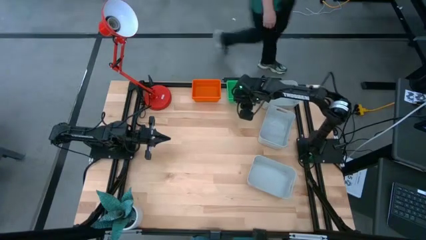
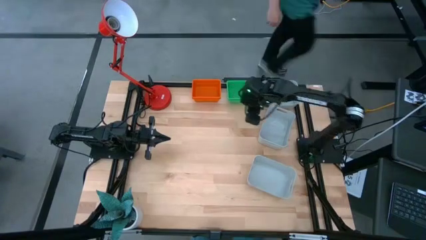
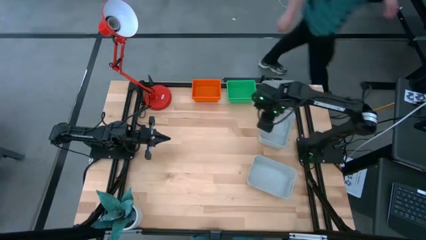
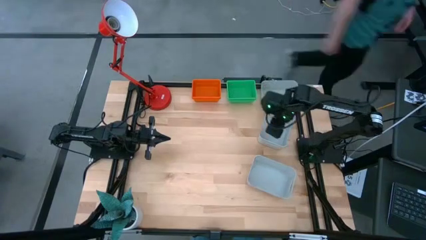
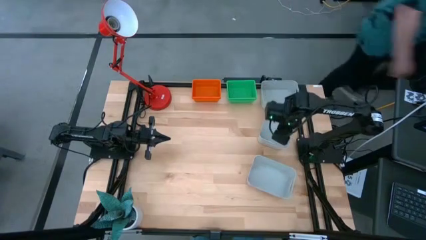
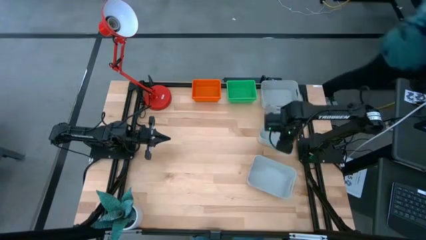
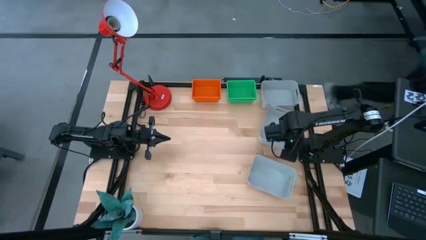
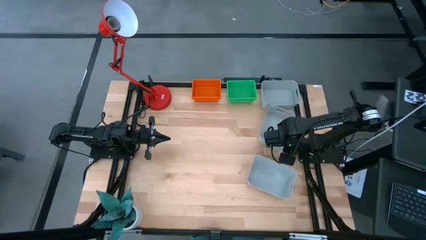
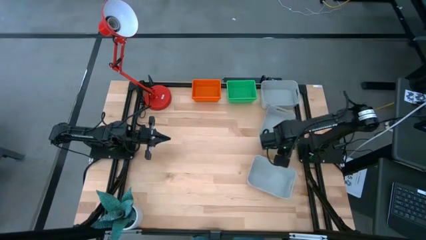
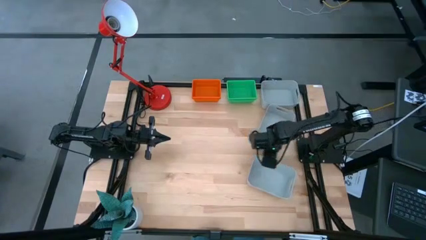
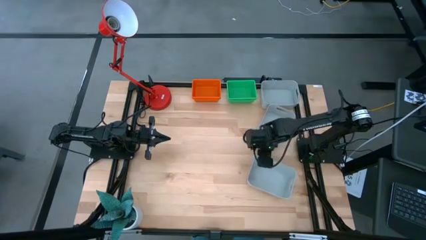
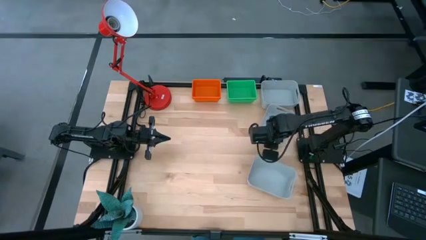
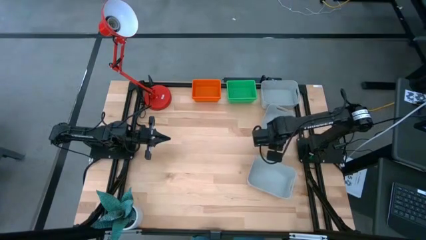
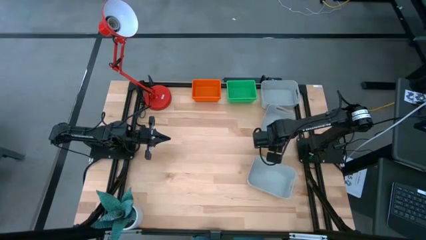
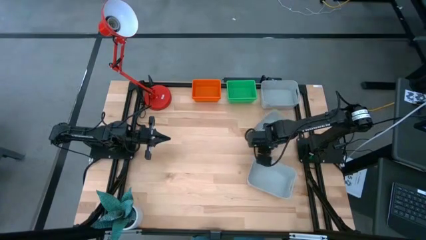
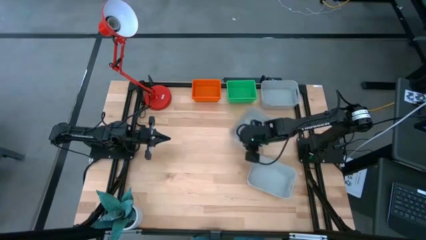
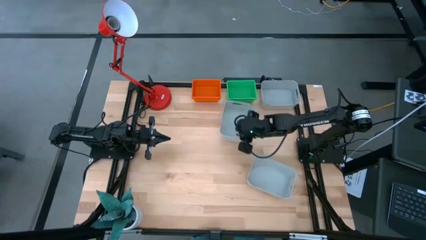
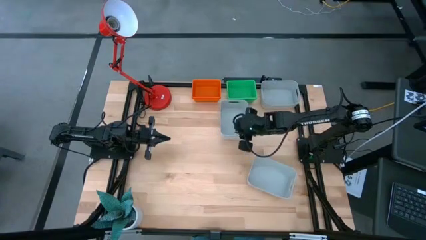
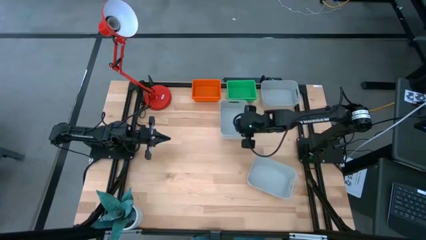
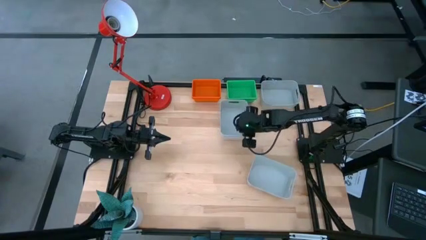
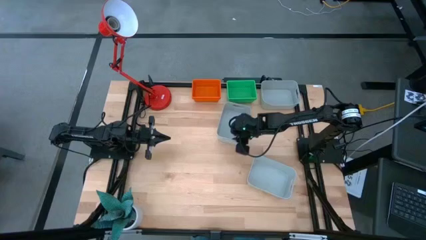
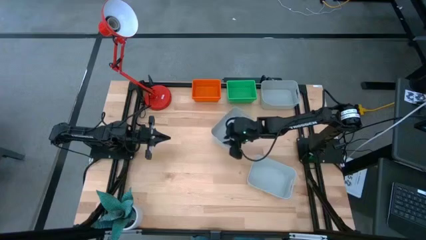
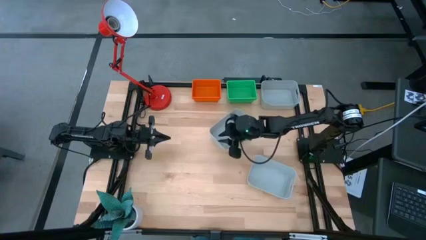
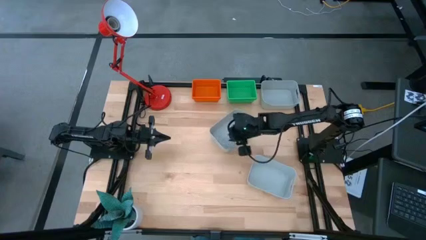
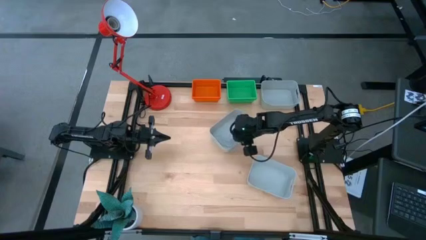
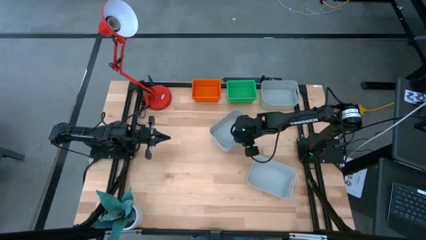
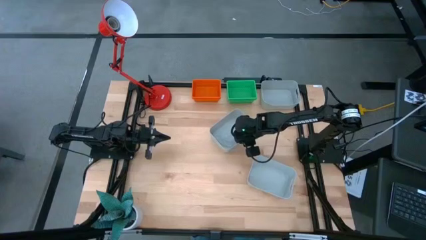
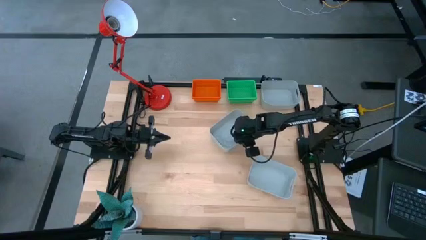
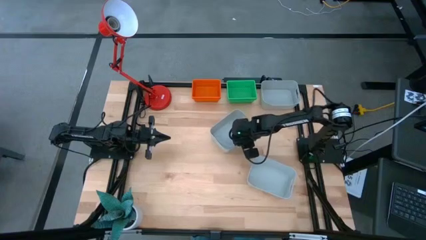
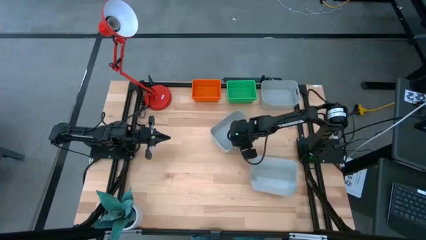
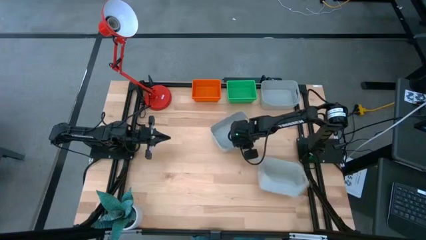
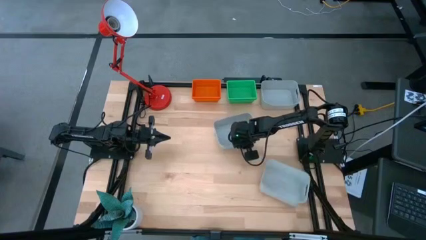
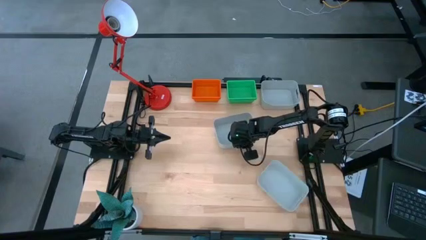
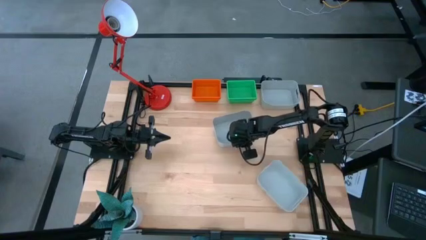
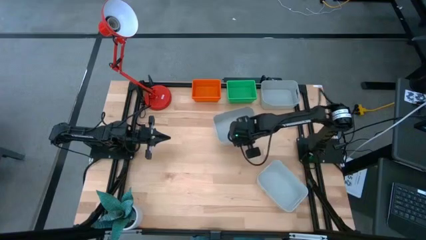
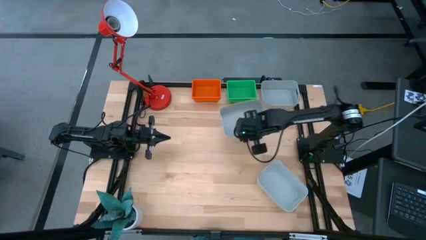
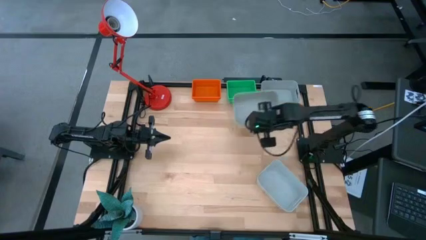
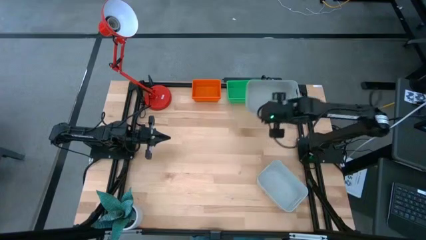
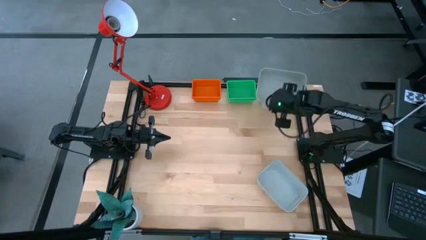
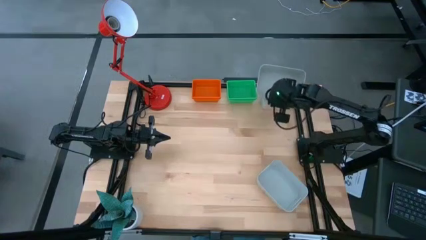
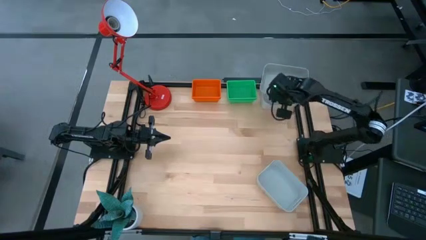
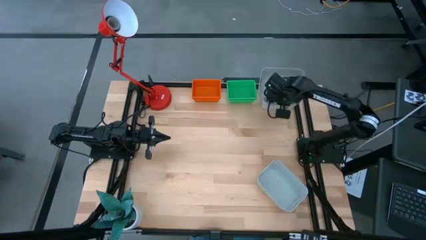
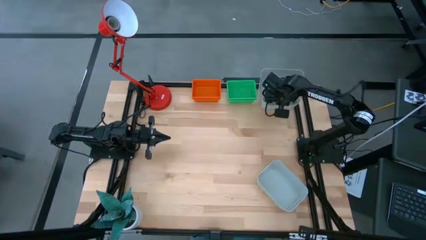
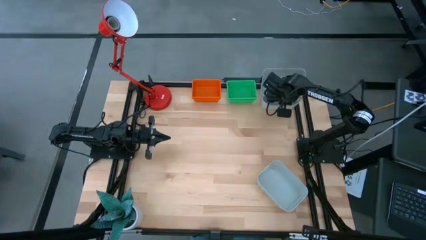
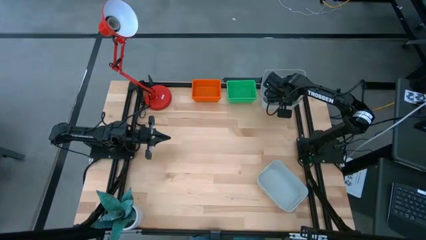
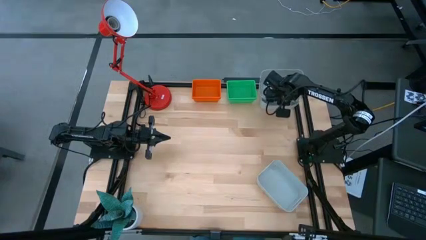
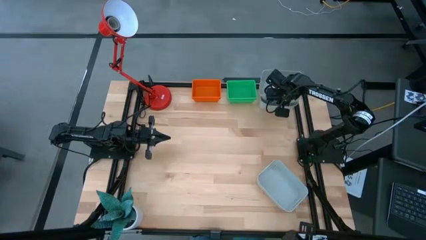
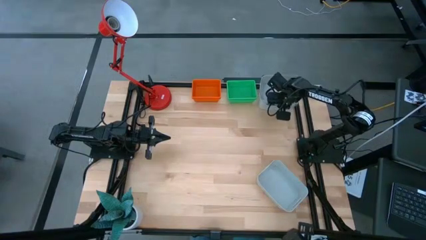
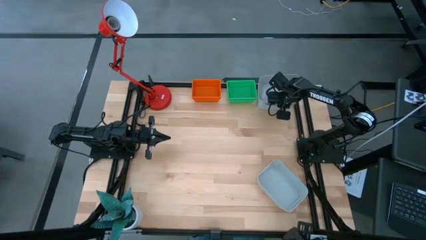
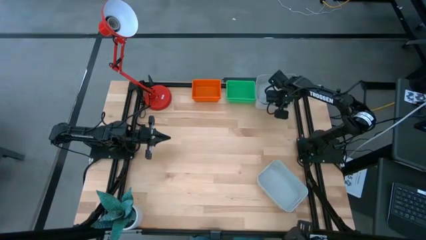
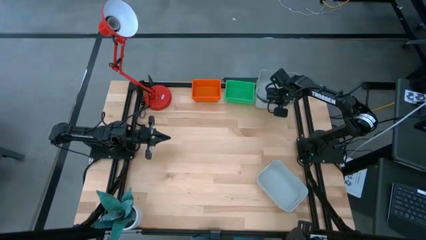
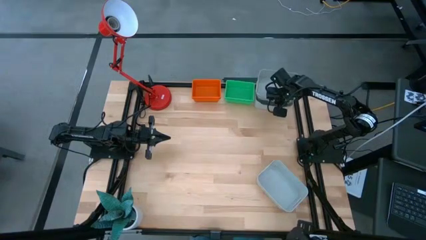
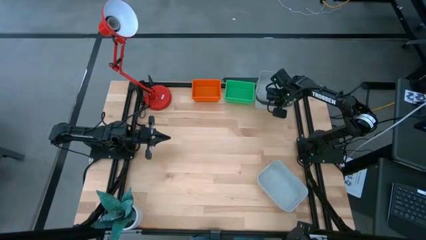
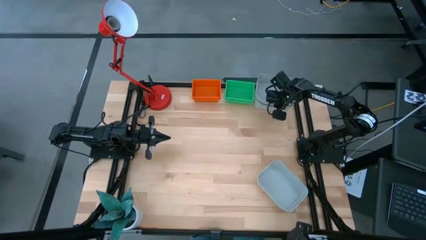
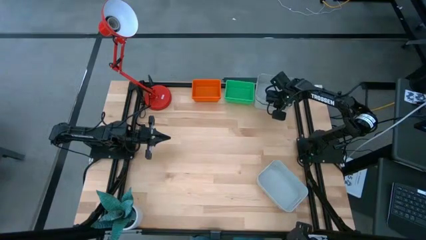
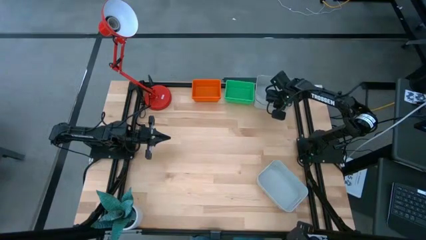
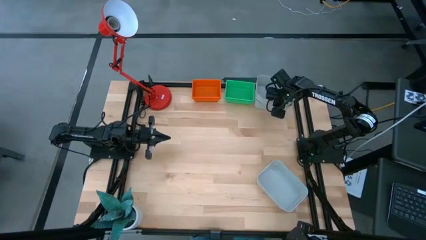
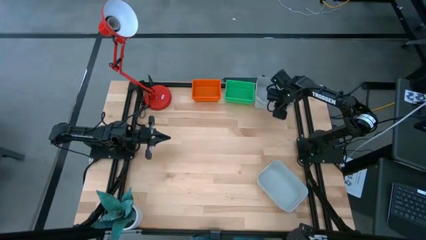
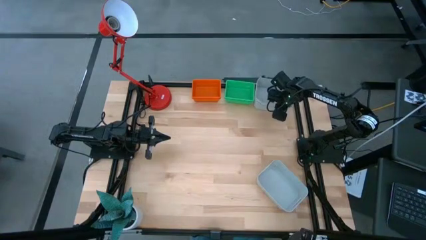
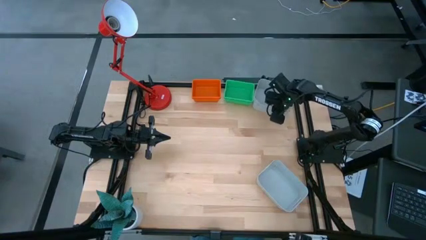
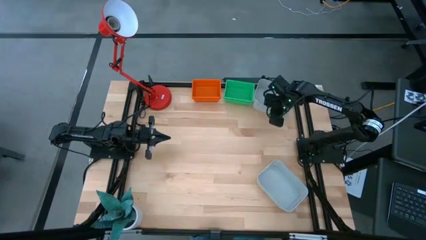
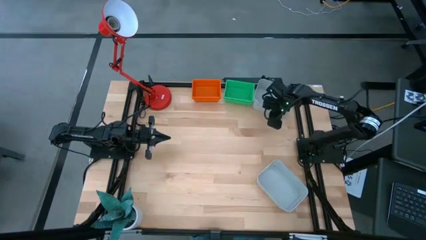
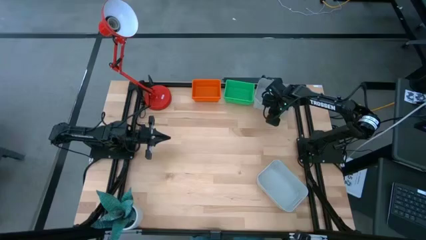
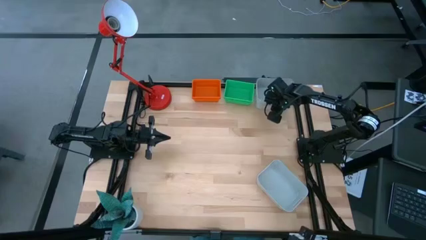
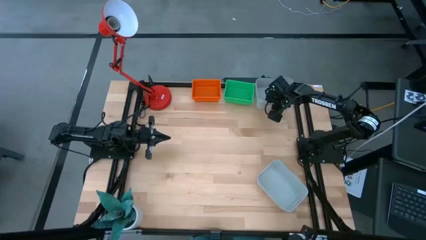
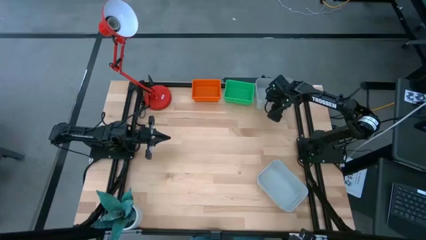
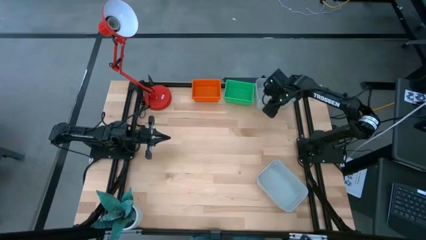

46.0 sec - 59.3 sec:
Stack the middle gray bin on the top gray bin

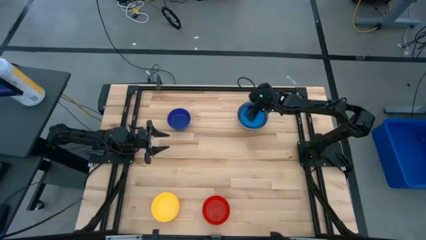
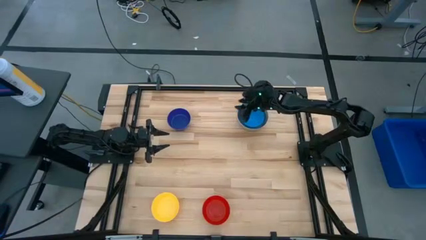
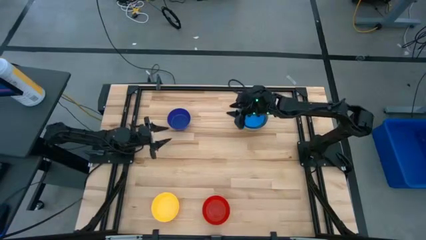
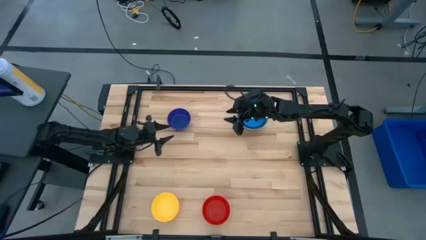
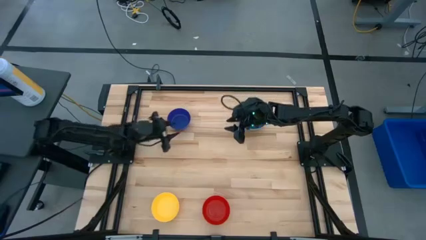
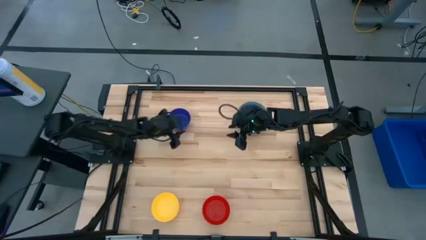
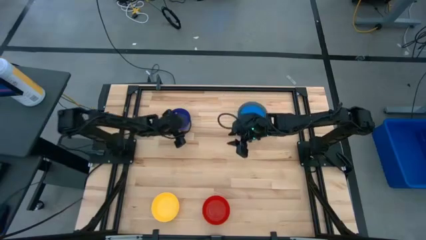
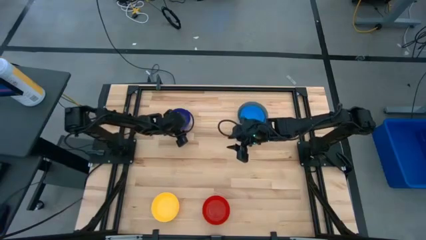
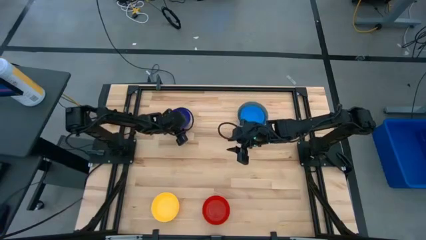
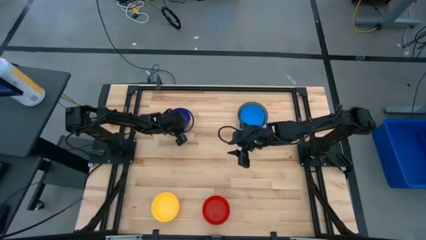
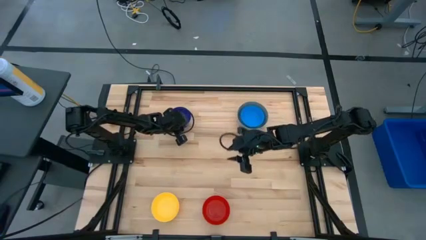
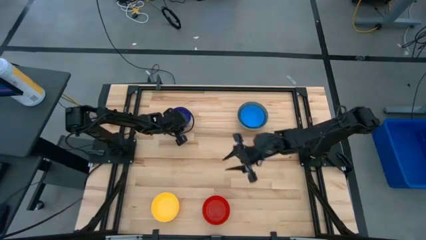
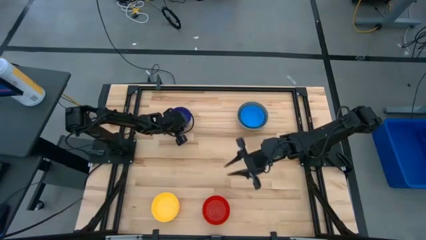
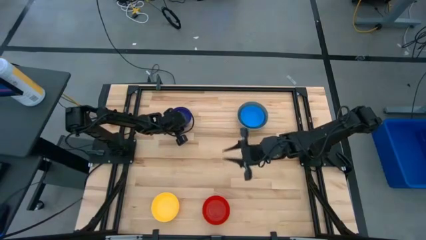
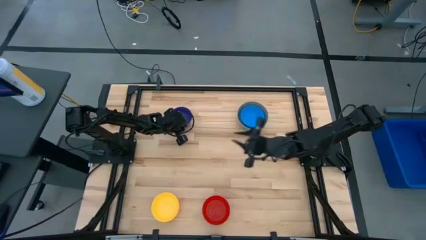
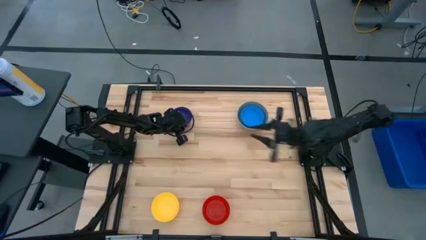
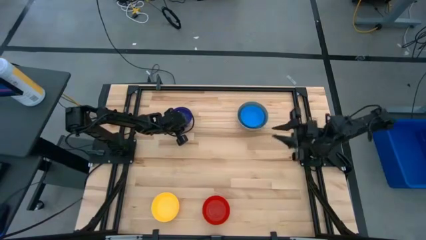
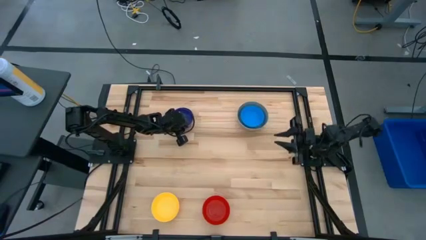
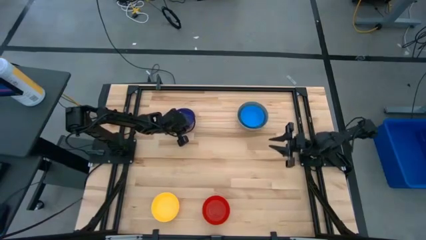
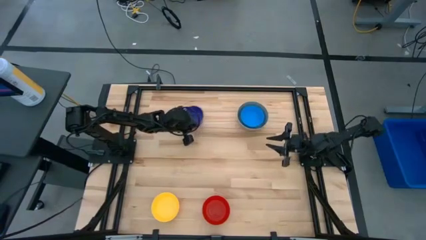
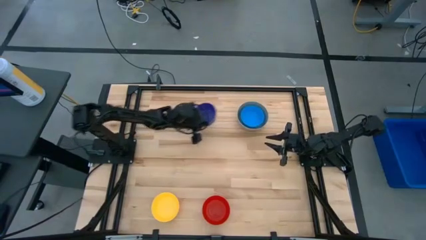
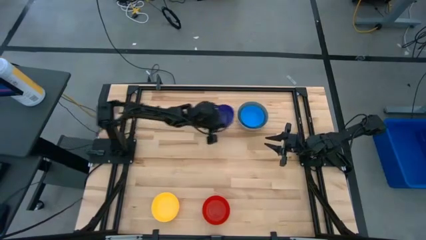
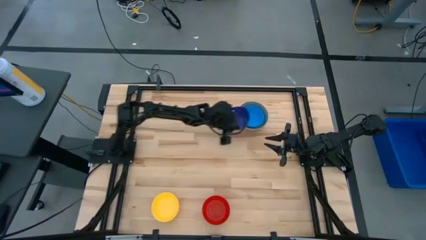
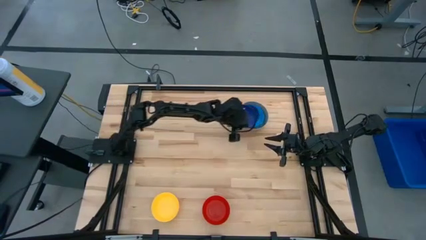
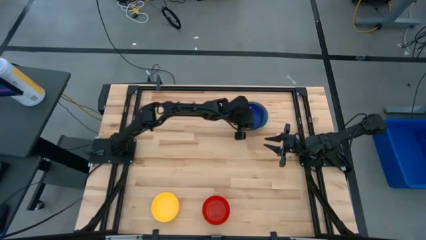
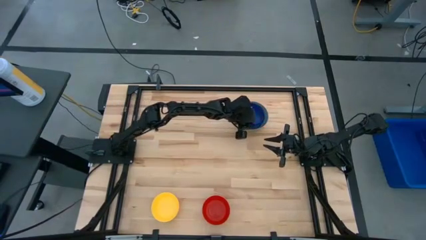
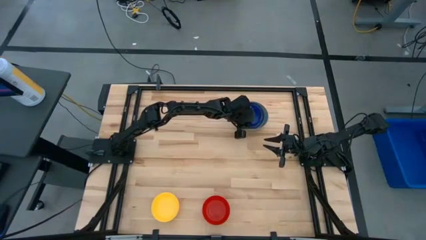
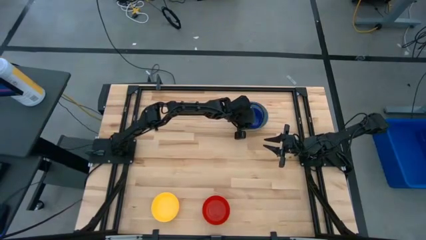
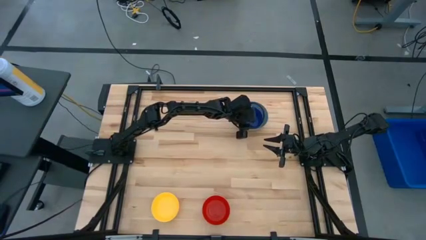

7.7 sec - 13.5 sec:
Stack the dark blue bowl on top of the light blue bowl
